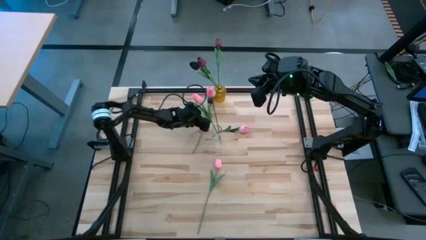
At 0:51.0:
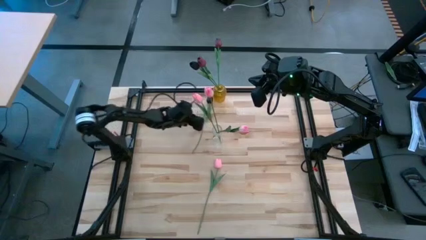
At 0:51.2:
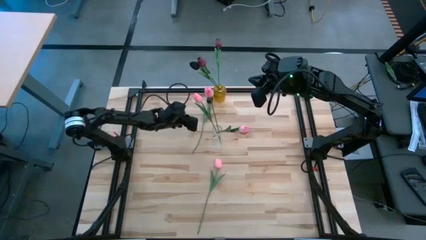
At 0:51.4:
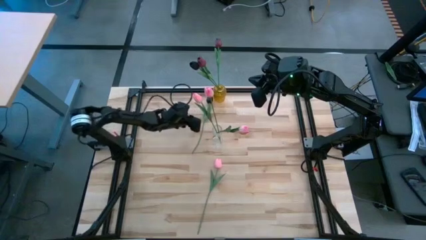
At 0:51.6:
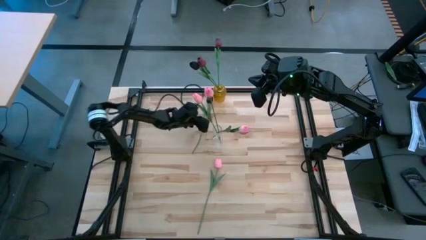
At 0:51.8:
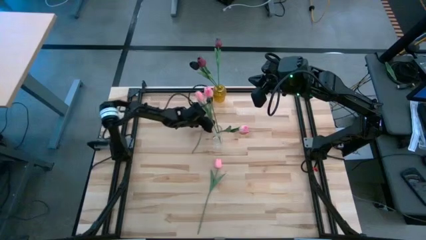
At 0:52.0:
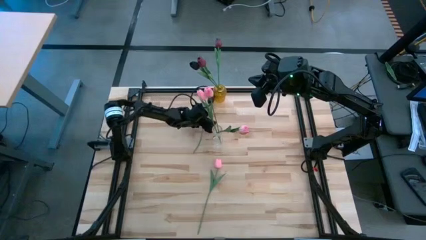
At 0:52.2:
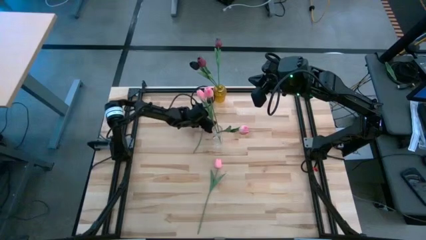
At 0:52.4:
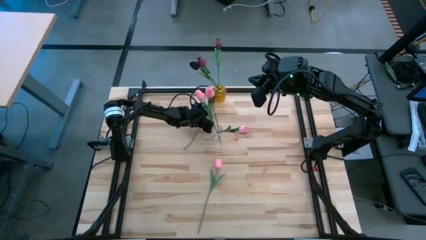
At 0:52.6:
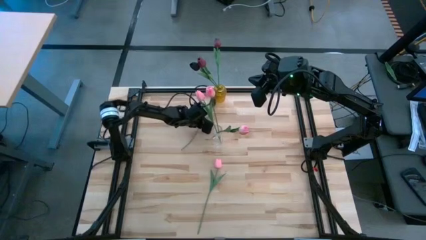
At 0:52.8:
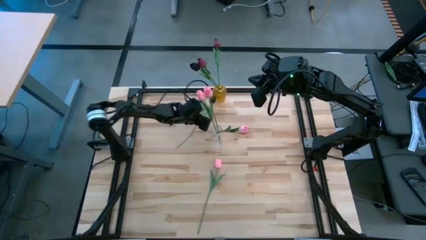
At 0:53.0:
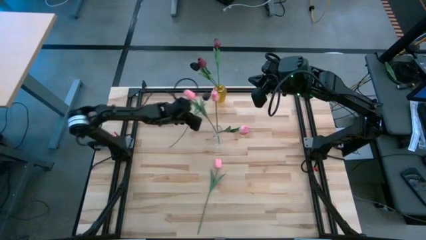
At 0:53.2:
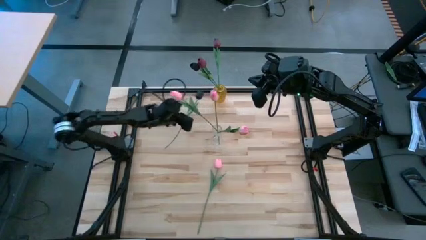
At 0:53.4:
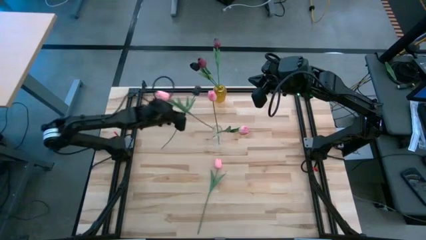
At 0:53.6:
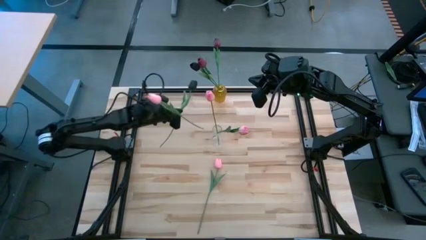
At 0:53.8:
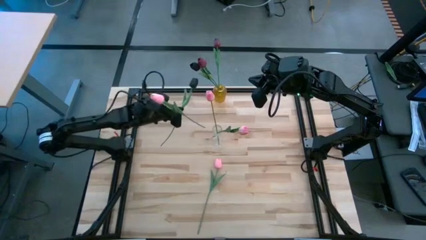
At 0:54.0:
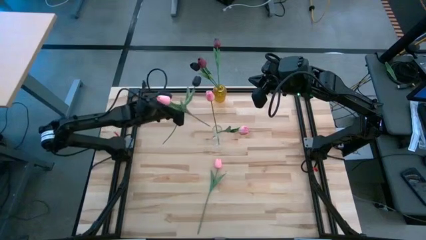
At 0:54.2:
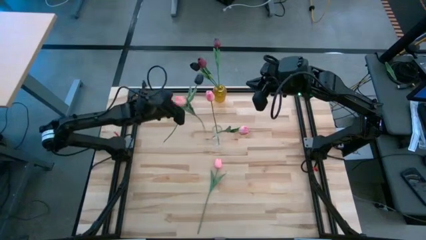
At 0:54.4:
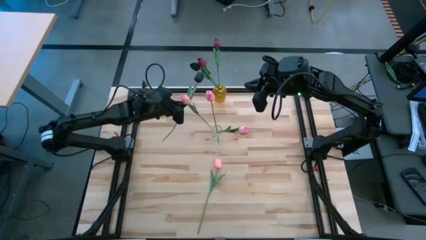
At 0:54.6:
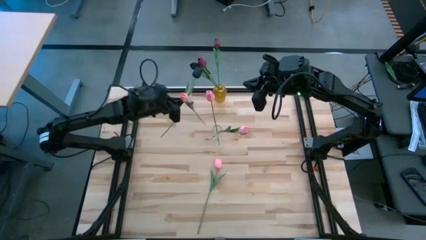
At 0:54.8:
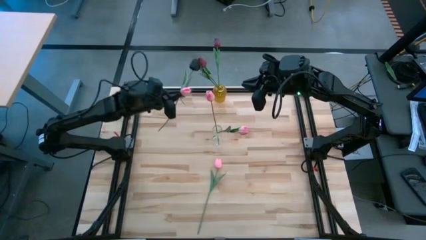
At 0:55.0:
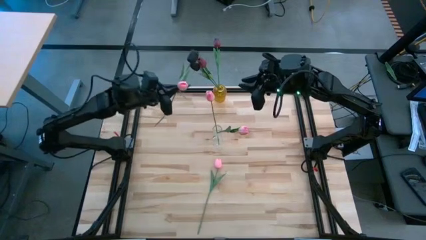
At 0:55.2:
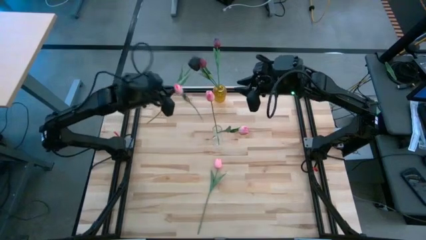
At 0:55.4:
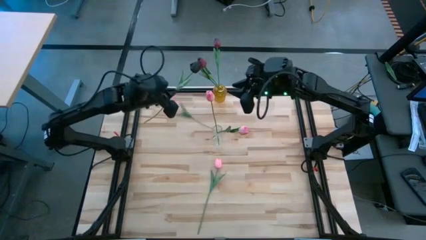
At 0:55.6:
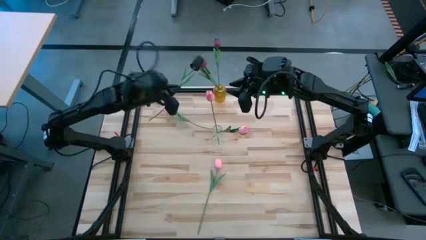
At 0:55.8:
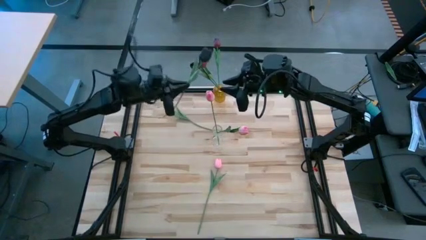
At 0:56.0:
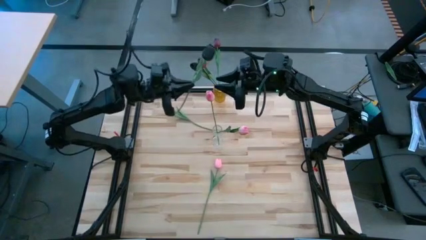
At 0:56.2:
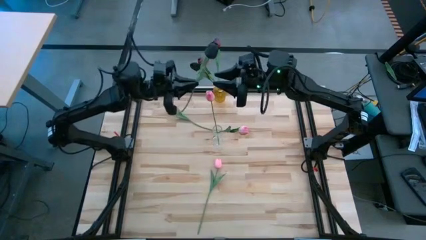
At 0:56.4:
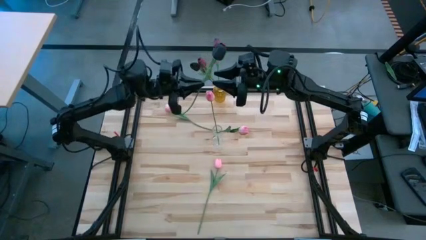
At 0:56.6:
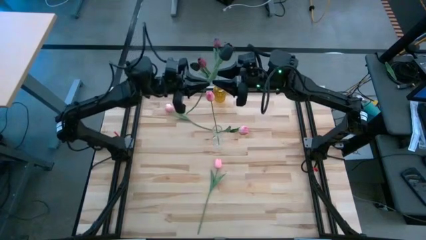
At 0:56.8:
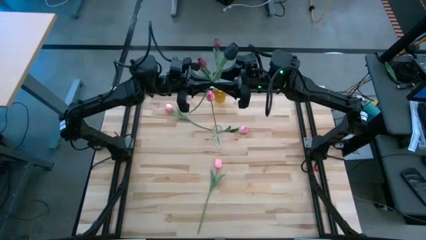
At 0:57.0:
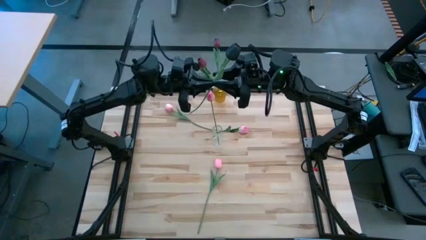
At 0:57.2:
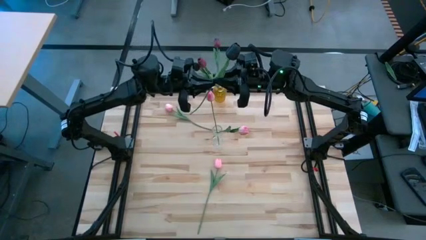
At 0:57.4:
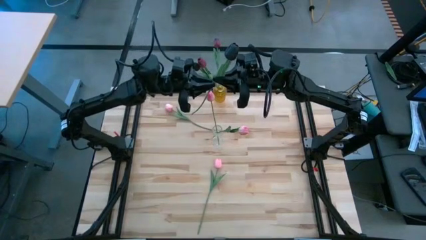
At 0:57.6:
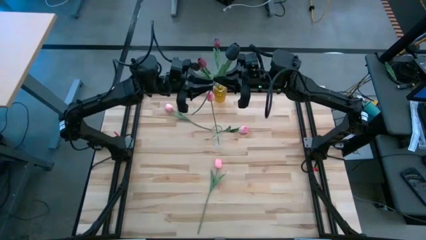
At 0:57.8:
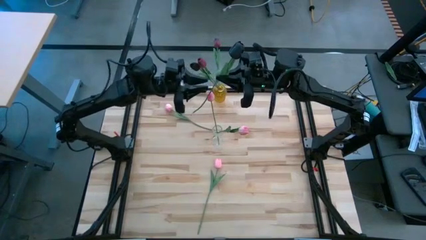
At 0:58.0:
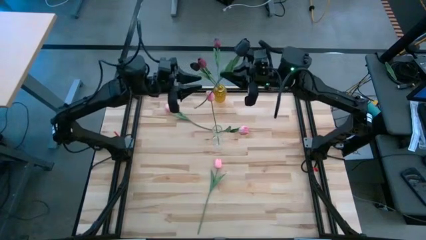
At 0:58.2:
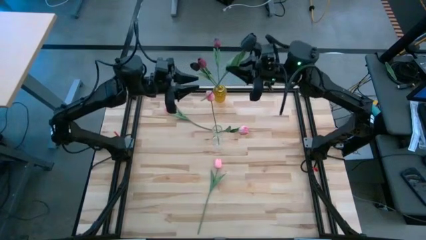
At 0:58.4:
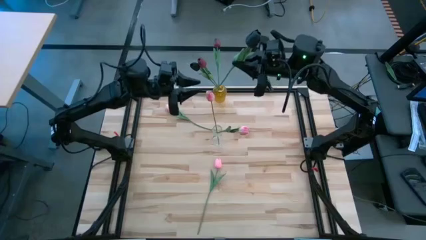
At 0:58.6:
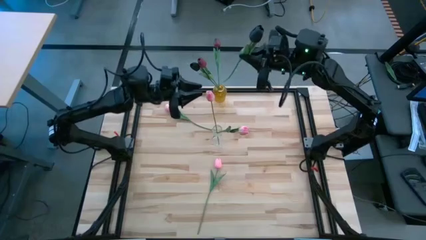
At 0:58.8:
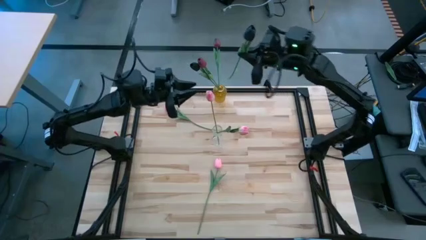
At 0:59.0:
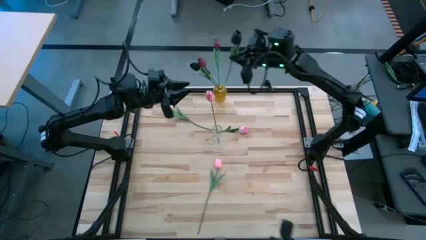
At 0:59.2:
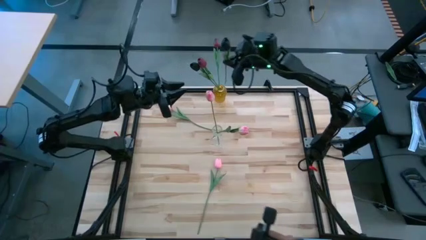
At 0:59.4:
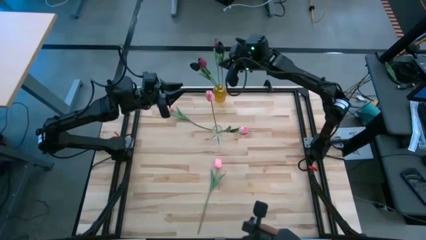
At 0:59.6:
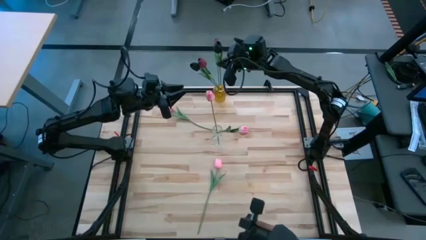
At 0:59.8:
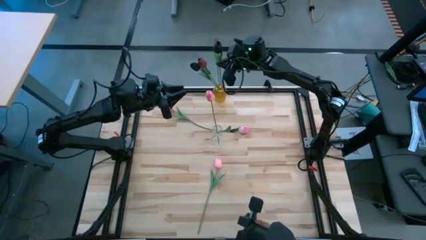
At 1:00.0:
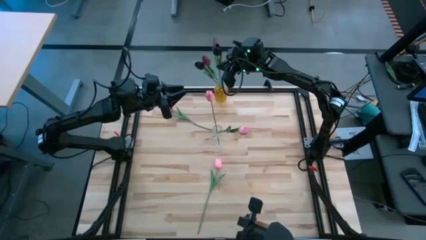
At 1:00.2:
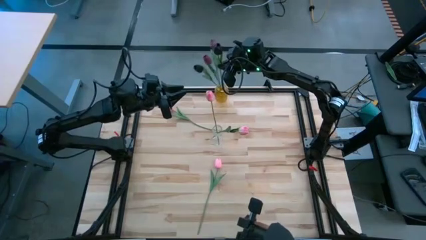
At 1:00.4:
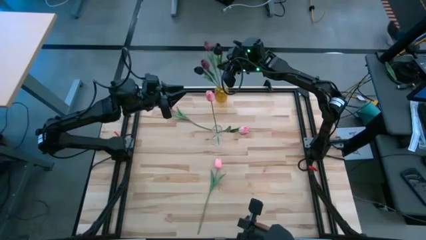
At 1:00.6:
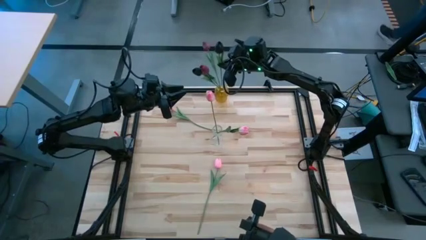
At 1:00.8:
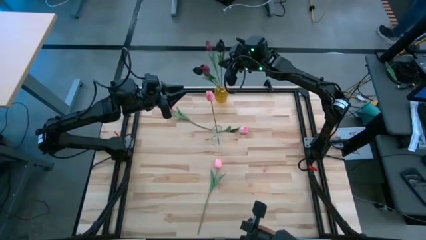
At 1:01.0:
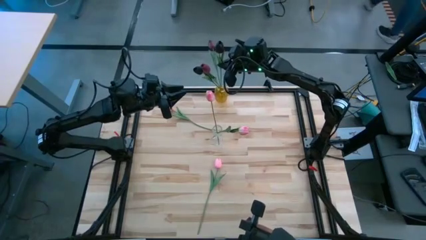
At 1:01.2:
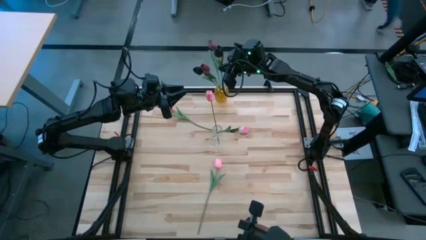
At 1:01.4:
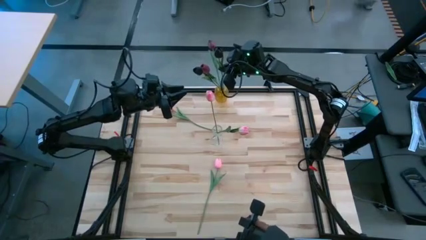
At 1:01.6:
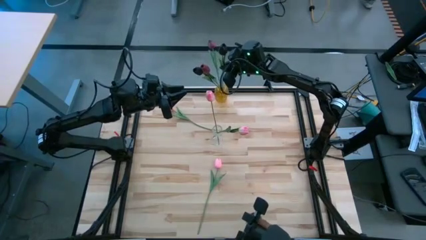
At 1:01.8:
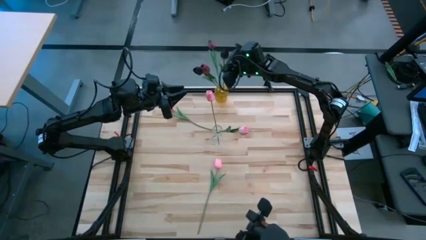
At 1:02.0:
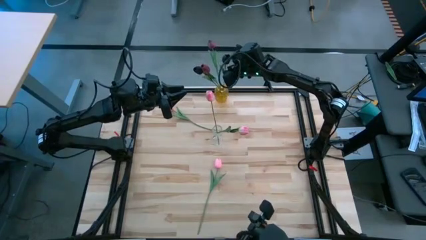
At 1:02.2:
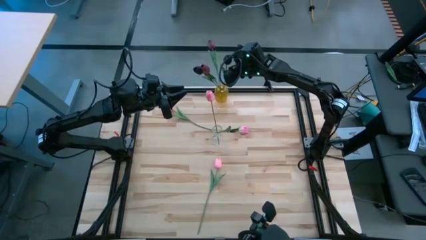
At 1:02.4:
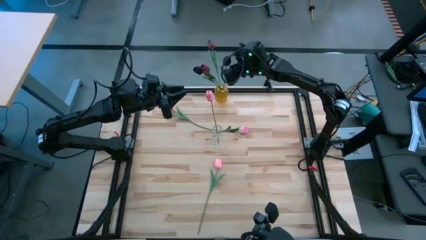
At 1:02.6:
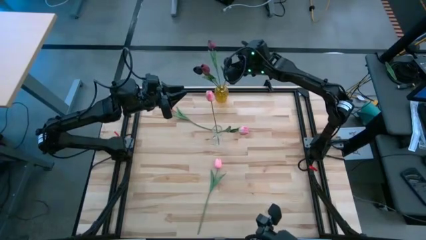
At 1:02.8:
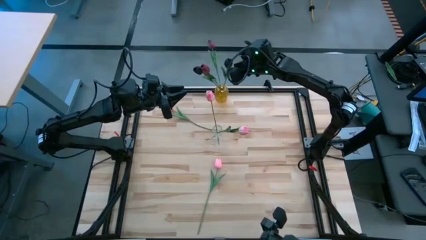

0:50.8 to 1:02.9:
Task: Sort flowers into vase by color
Put the black flower into the yellow vase

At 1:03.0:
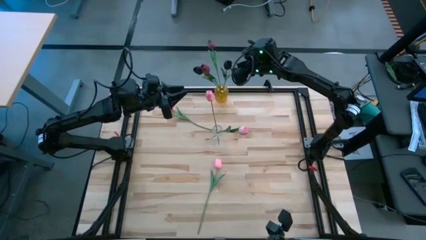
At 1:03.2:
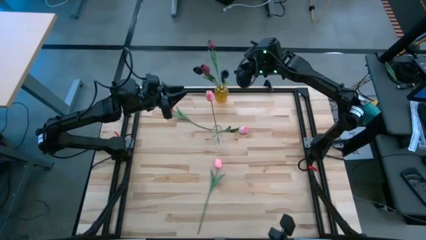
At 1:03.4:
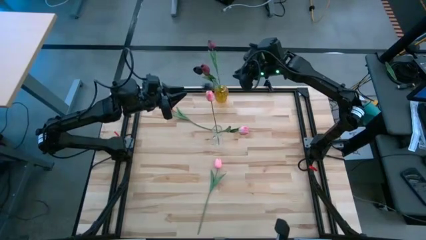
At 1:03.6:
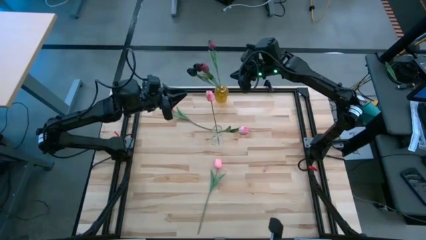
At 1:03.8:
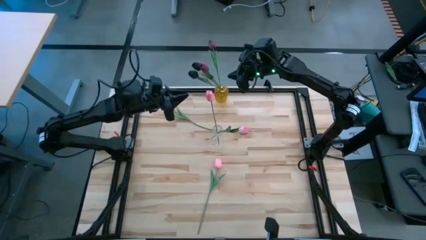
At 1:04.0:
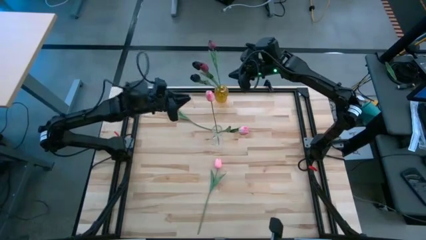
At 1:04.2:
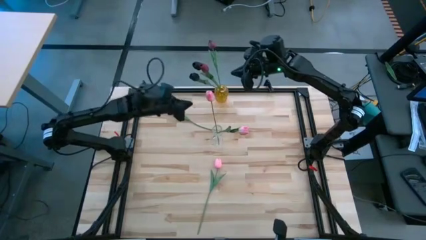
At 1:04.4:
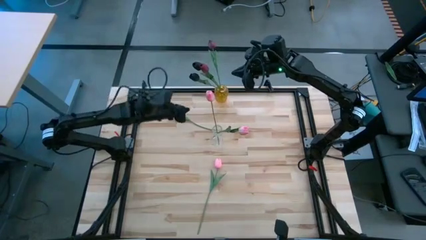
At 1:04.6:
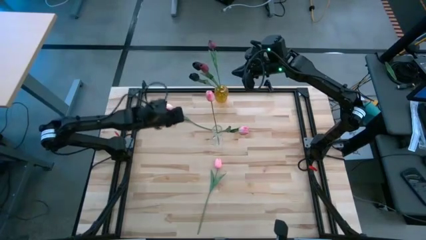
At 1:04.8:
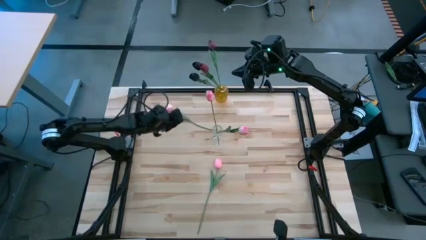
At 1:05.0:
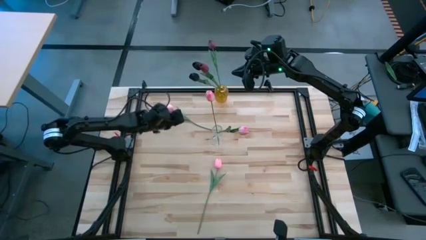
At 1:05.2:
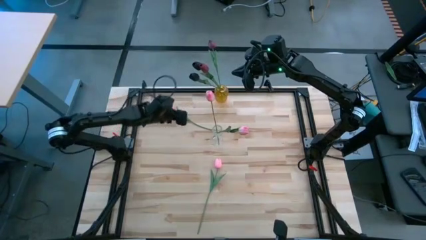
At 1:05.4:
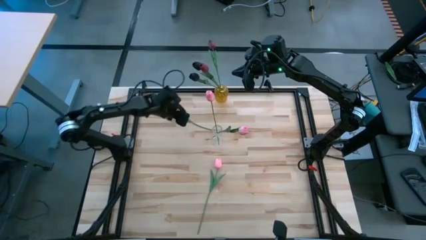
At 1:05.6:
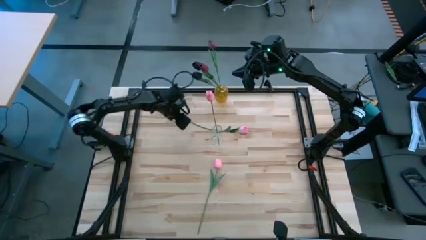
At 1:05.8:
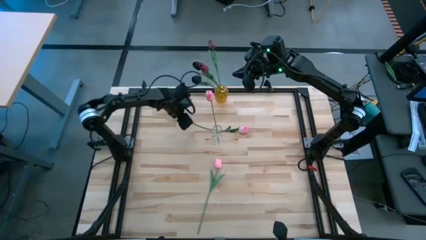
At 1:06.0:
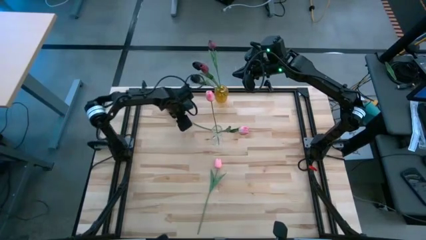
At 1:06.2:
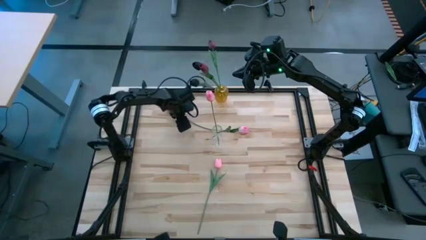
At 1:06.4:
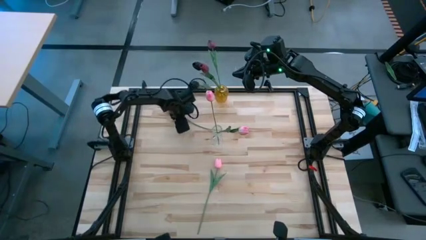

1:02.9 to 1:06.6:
Put the pink flower into the transparent vase
